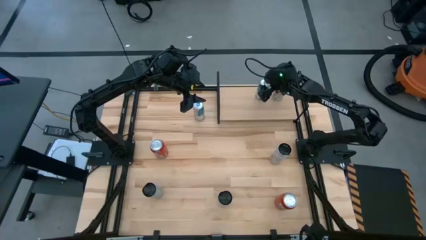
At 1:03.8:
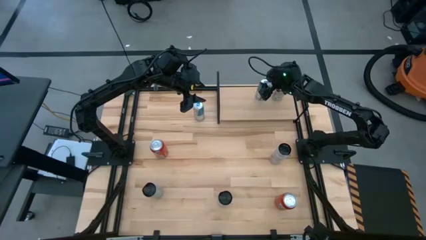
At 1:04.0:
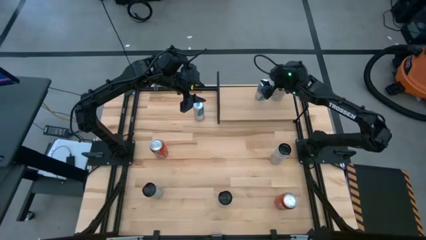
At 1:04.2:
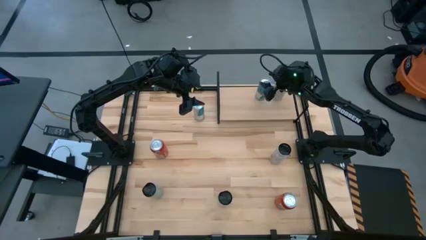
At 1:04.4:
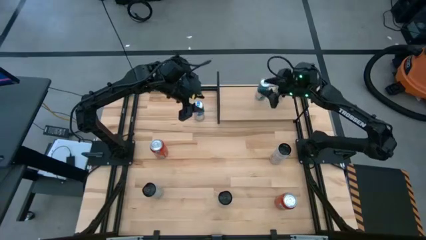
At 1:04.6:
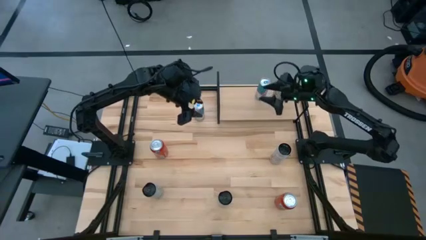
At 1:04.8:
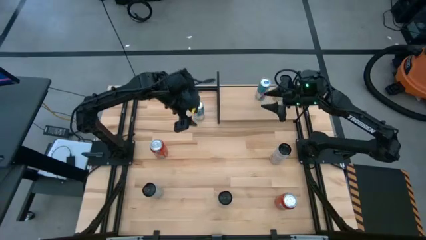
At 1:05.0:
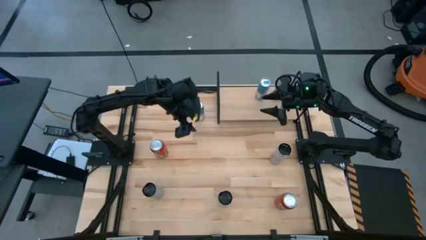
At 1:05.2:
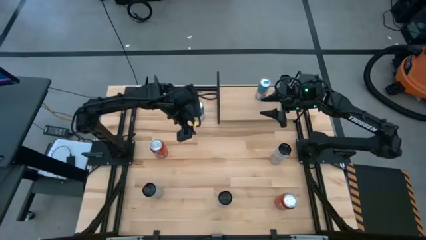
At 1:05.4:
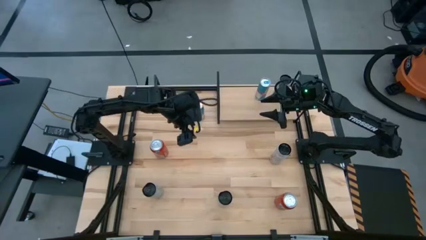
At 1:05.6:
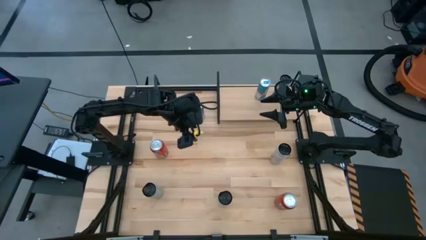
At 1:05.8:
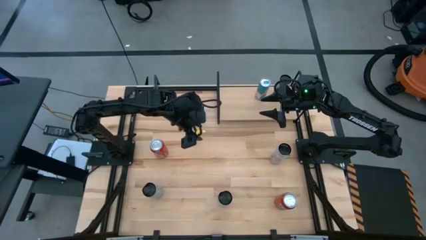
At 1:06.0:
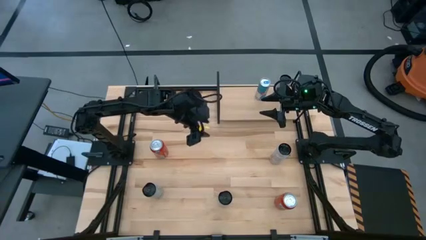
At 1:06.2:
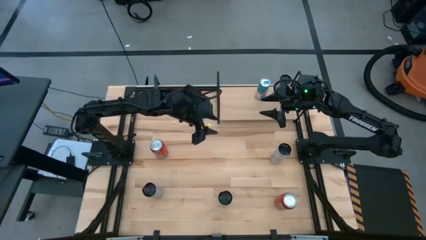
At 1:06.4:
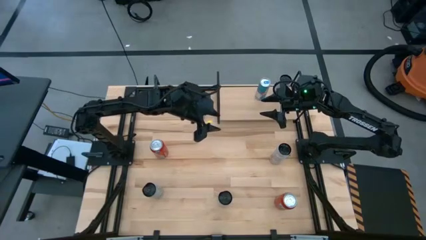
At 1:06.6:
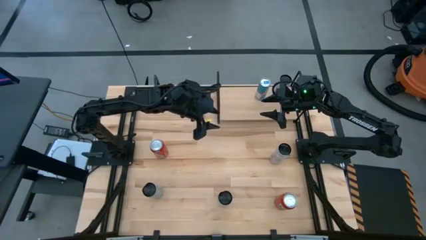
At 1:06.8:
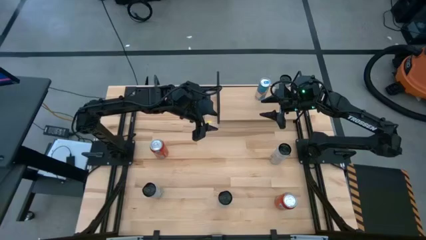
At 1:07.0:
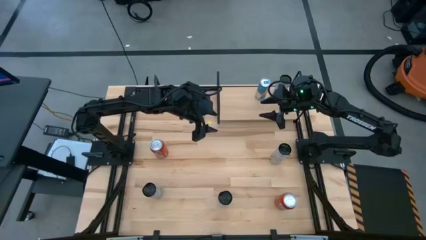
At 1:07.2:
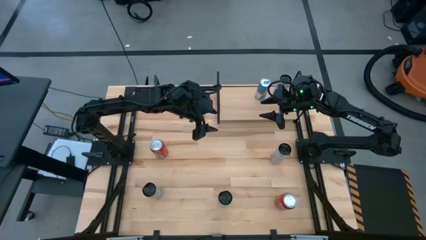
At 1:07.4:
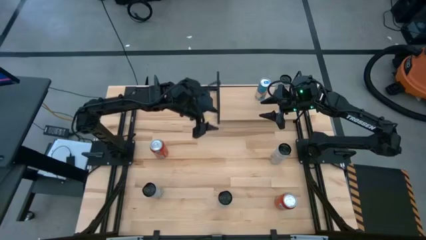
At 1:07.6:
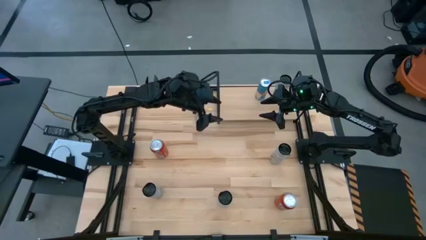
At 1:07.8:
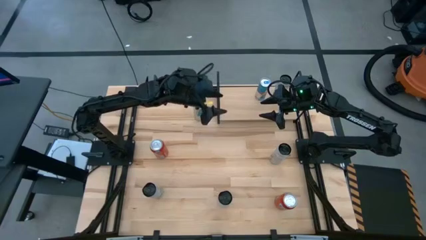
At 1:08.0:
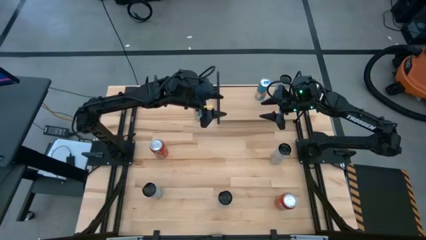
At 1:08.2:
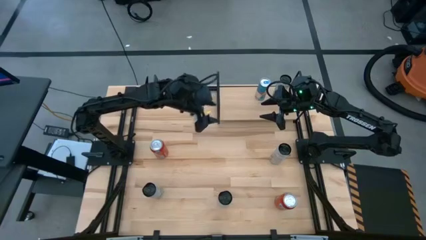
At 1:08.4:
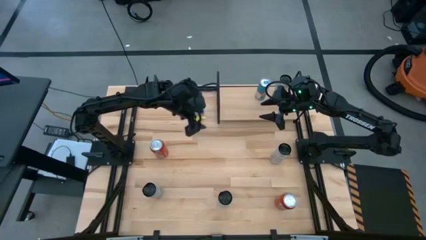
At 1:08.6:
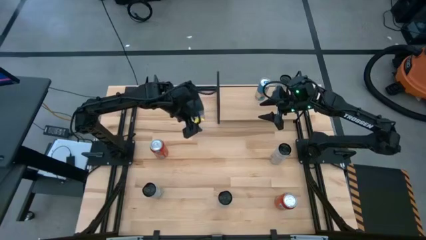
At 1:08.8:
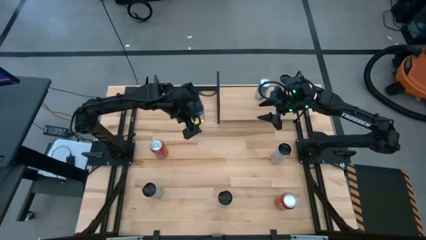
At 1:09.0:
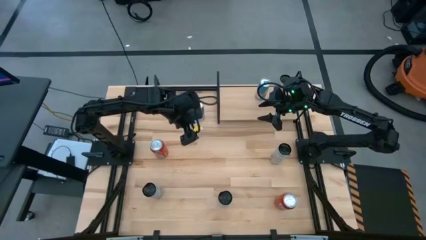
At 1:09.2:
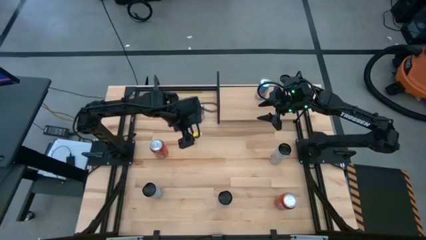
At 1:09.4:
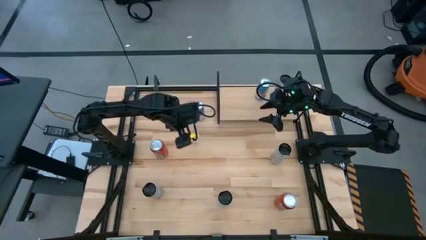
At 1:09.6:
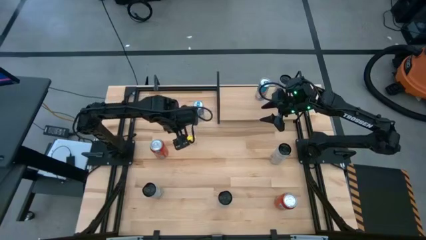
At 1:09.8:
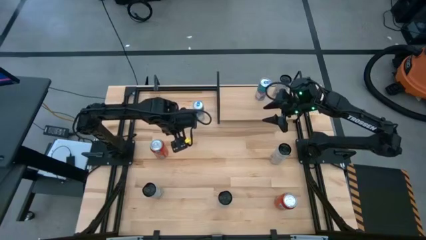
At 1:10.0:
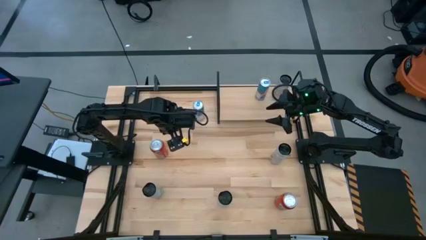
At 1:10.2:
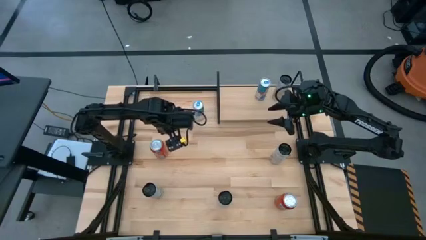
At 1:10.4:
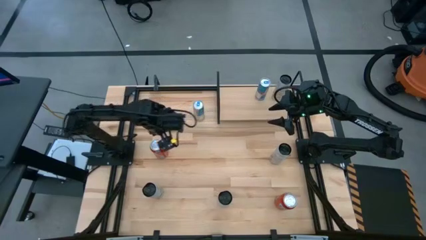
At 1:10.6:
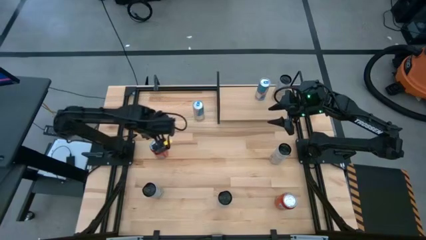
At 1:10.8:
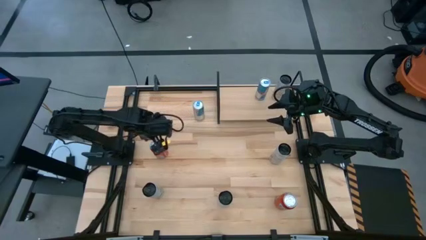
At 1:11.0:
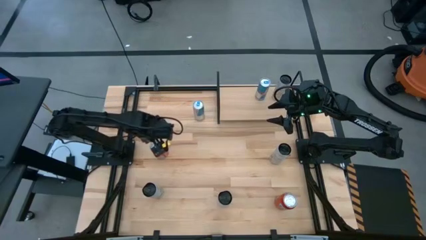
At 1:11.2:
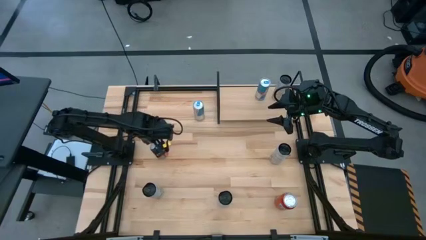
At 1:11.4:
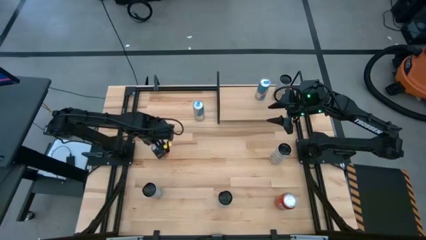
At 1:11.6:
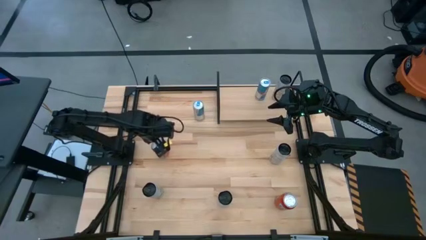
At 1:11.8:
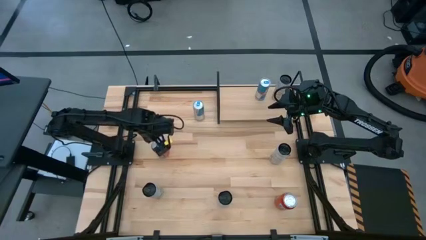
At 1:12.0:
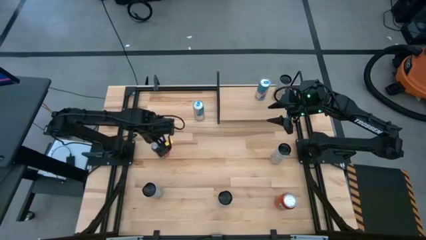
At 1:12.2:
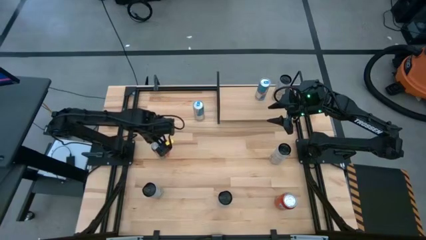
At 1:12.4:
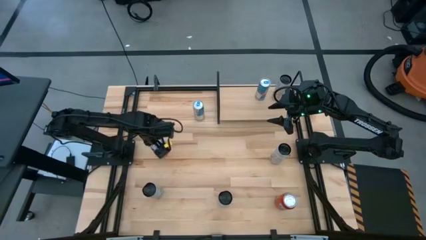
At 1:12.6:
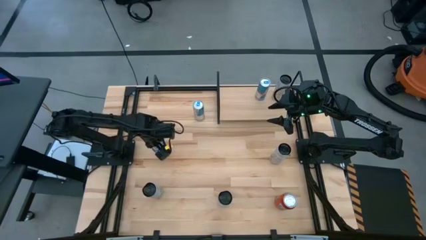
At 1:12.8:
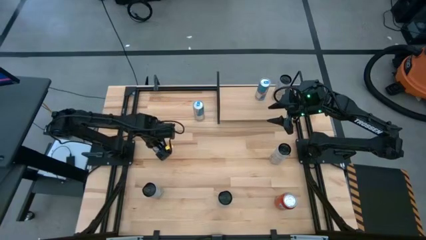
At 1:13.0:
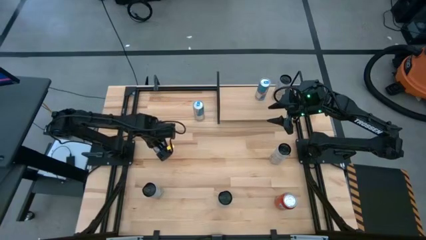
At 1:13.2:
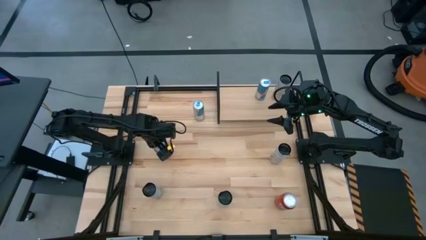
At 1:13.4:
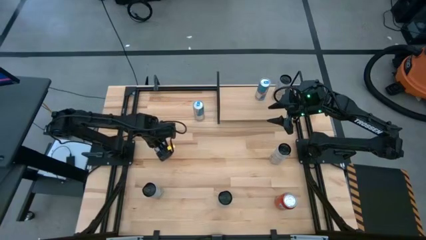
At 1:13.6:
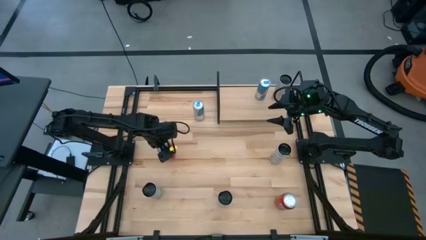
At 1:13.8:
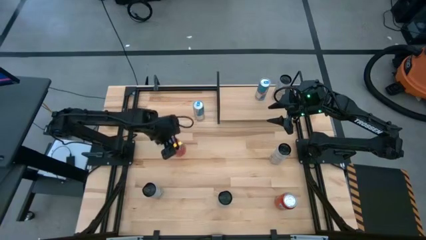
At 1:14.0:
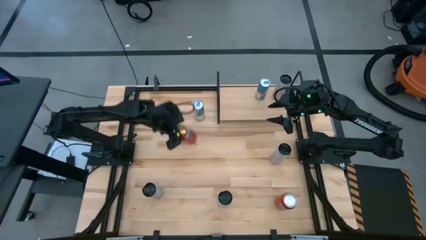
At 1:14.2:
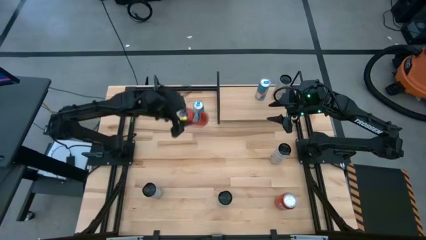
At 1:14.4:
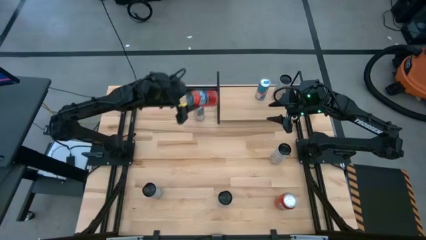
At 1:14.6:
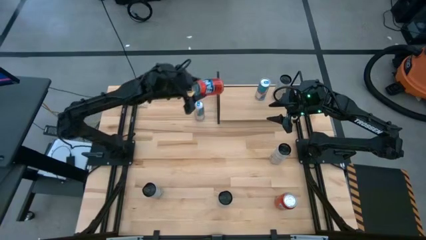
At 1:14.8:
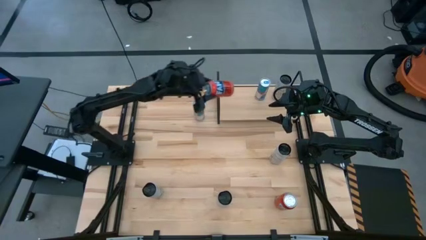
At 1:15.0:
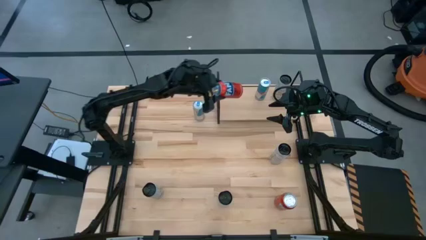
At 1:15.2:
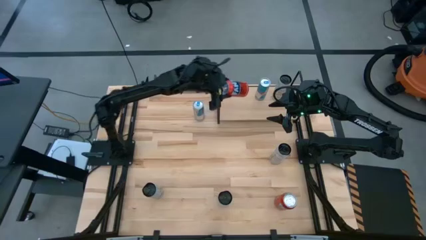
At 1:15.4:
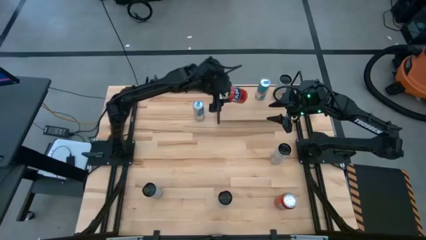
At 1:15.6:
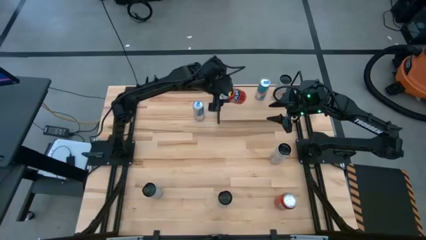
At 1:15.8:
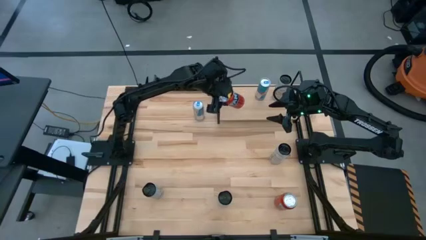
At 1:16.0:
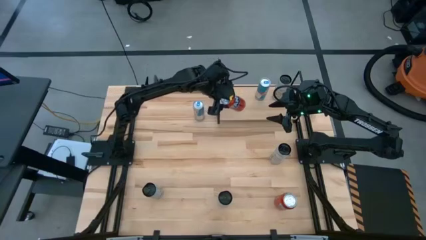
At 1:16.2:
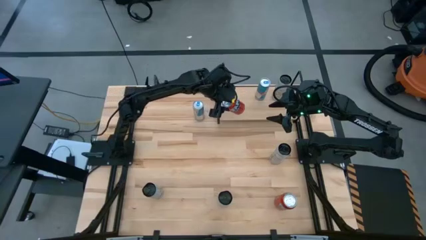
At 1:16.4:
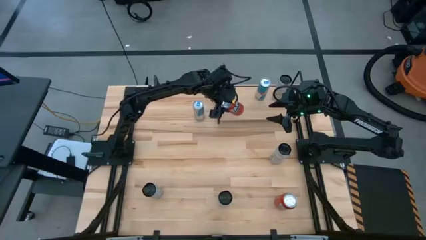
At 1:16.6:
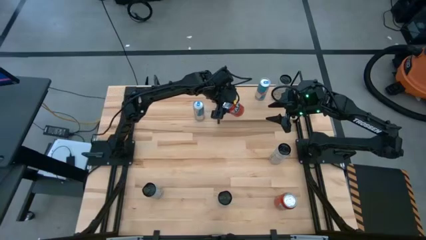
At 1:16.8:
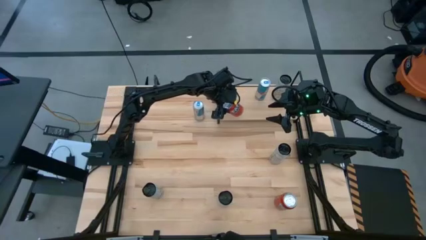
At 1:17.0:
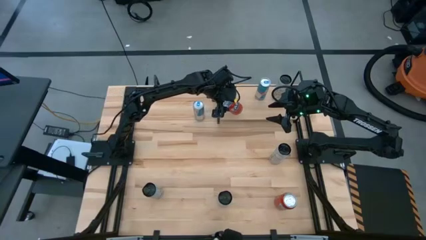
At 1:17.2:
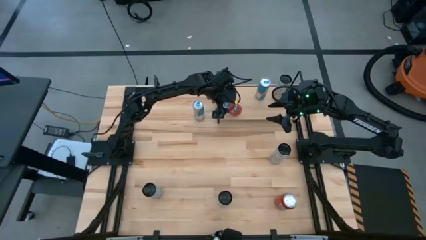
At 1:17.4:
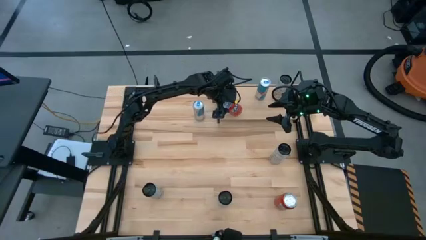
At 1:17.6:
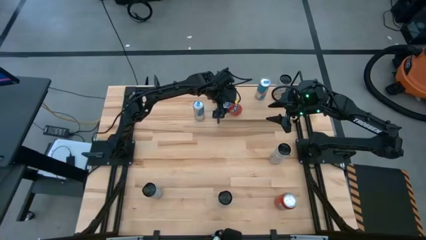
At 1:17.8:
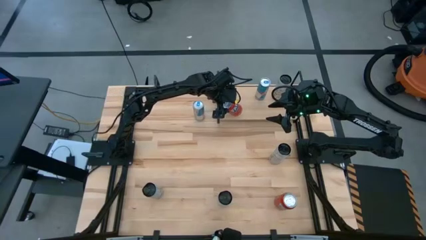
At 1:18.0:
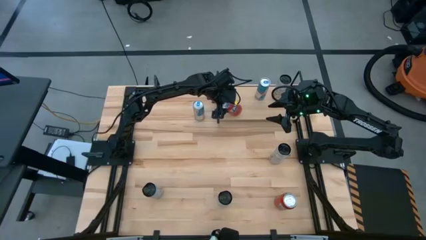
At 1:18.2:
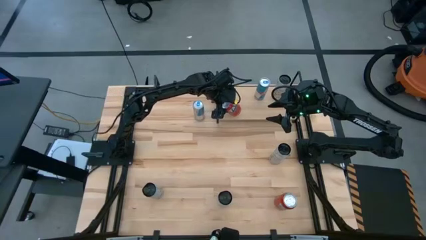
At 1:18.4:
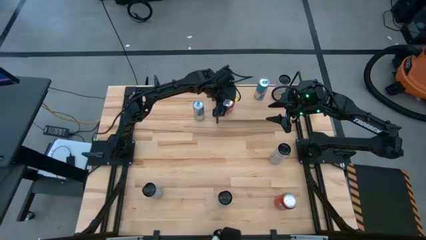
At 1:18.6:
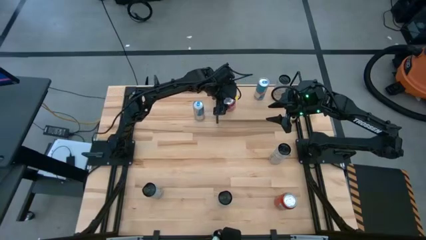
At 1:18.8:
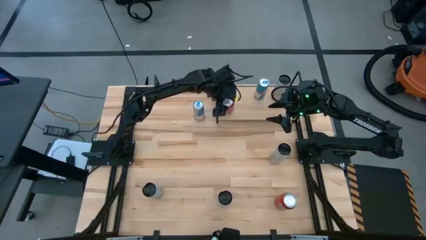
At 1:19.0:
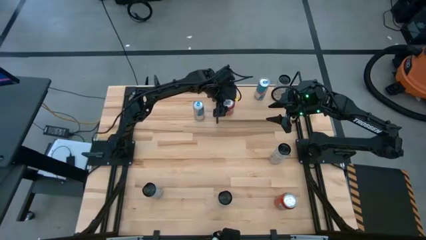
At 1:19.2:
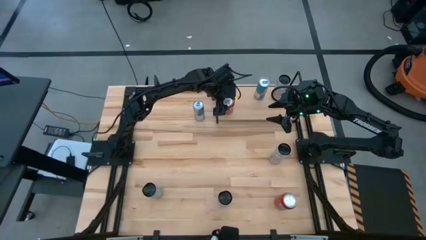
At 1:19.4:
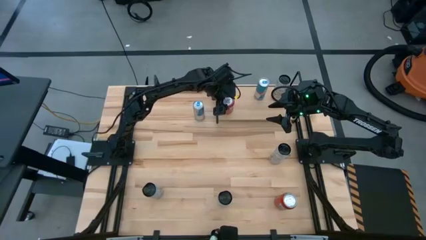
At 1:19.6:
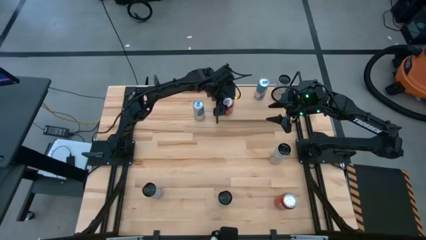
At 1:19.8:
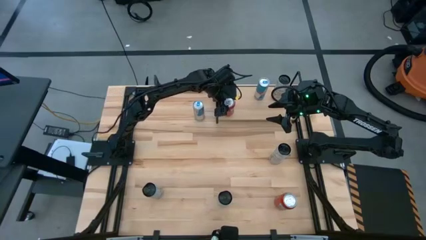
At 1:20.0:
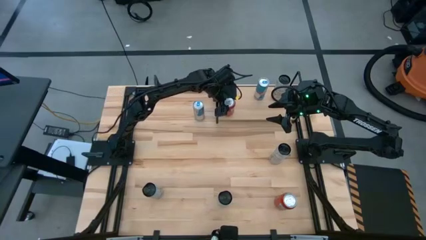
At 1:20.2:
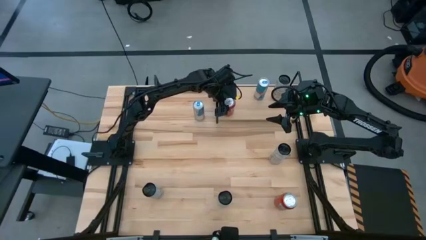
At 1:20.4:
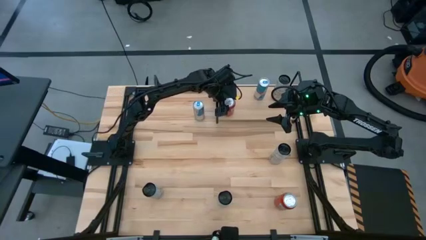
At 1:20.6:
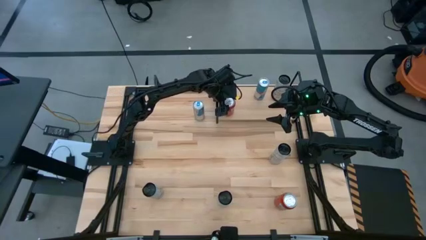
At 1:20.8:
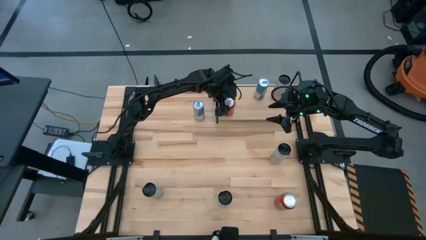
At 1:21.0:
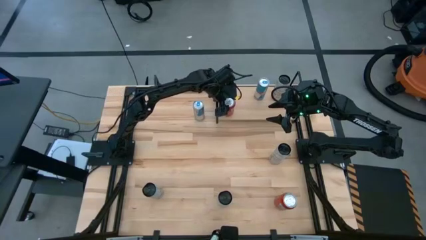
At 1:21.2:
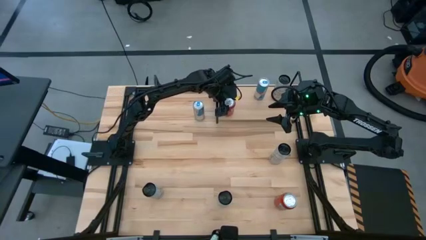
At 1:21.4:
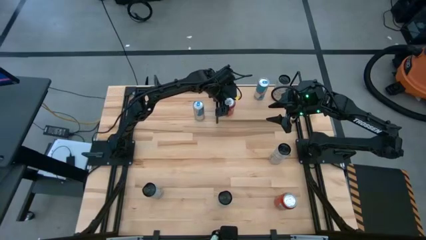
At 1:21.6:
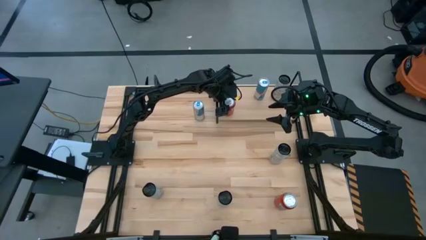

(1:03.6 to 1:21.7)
Task: Place canned beverage on shelf
Put the left red soda can on the shelf
